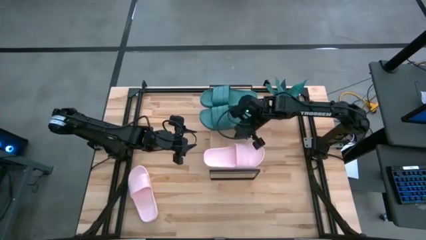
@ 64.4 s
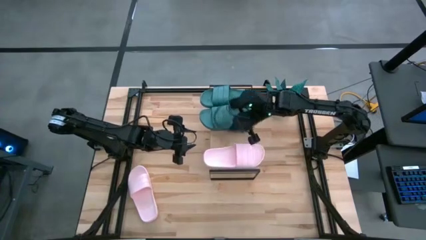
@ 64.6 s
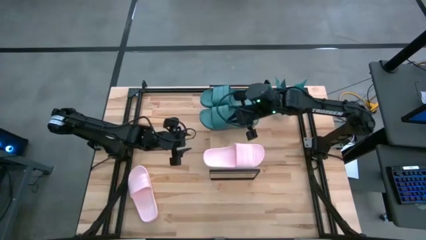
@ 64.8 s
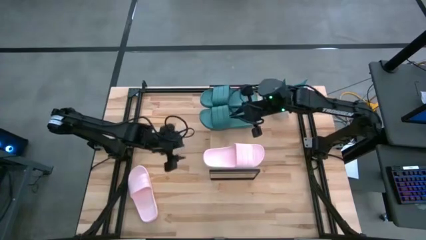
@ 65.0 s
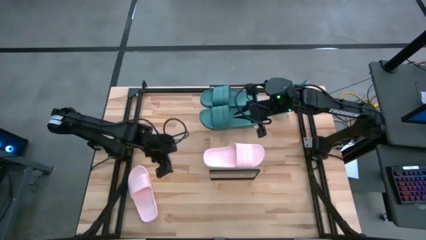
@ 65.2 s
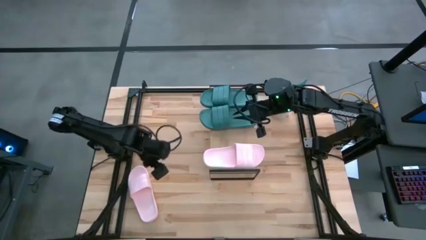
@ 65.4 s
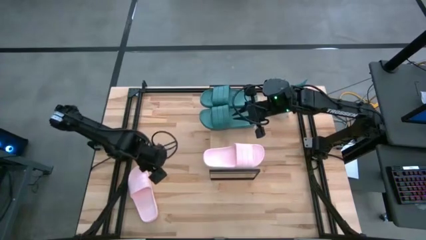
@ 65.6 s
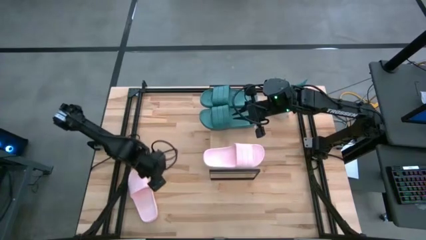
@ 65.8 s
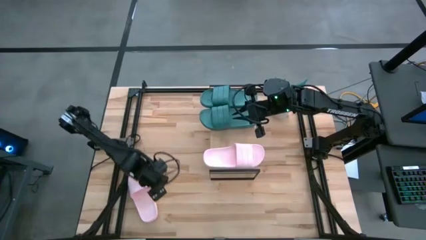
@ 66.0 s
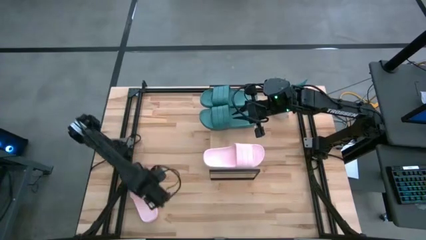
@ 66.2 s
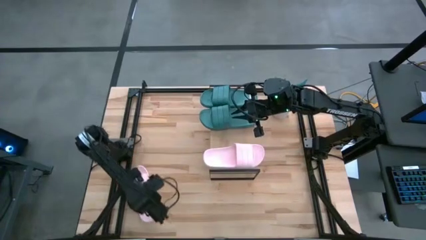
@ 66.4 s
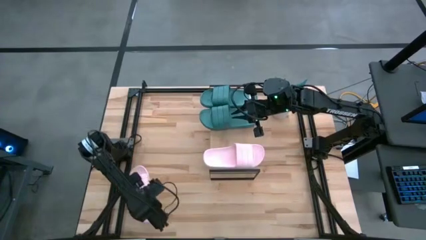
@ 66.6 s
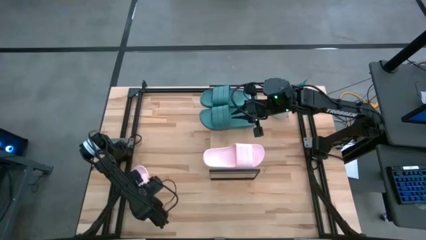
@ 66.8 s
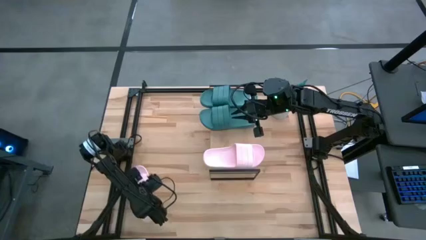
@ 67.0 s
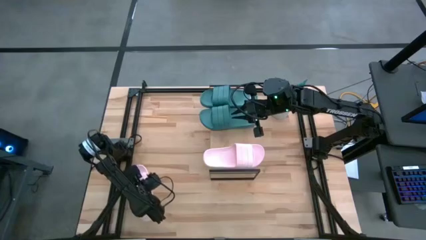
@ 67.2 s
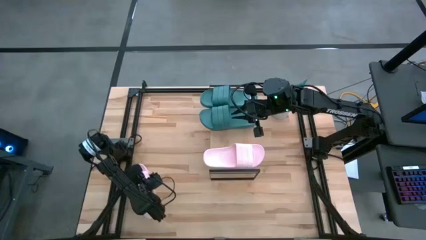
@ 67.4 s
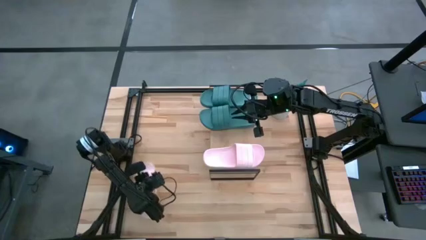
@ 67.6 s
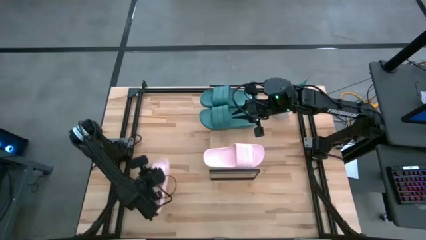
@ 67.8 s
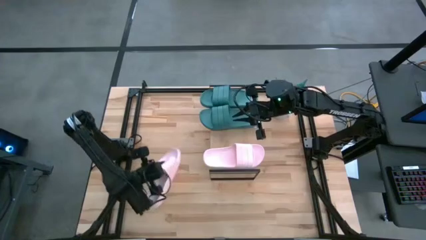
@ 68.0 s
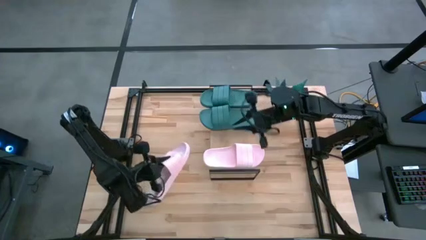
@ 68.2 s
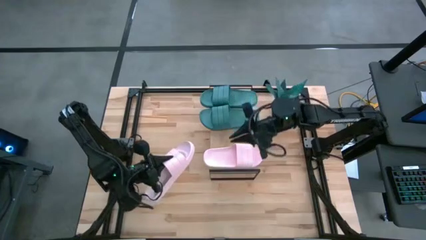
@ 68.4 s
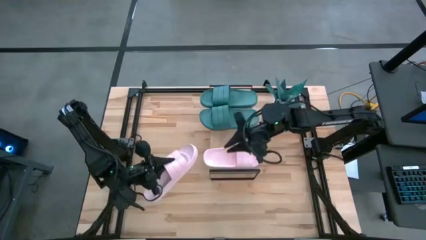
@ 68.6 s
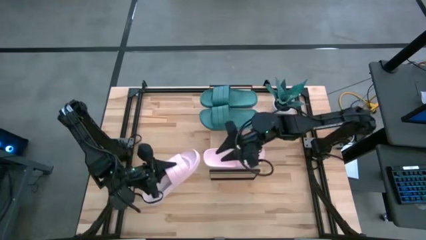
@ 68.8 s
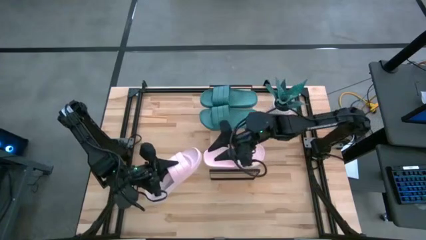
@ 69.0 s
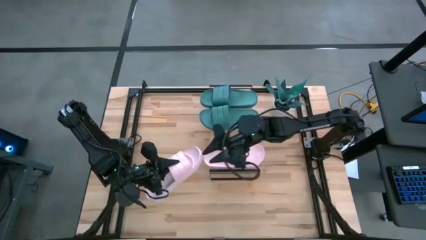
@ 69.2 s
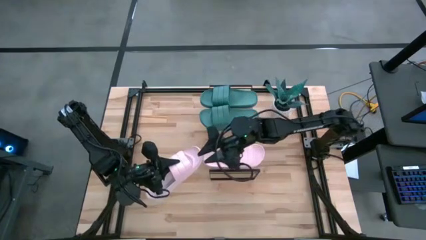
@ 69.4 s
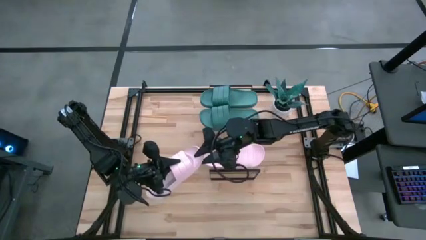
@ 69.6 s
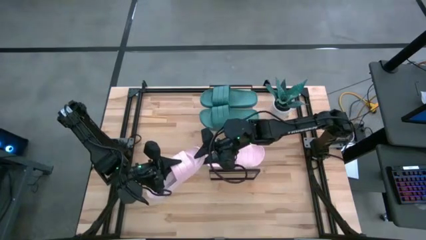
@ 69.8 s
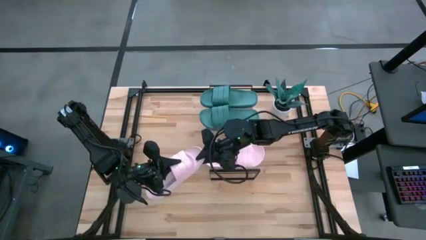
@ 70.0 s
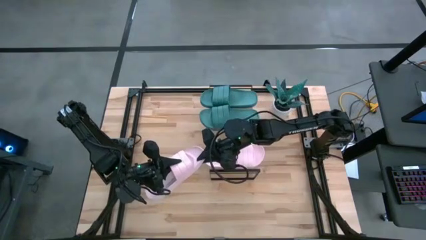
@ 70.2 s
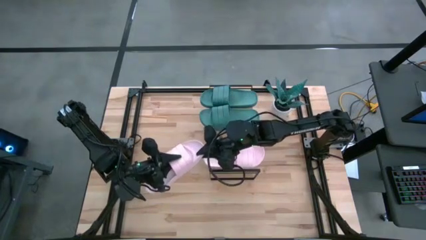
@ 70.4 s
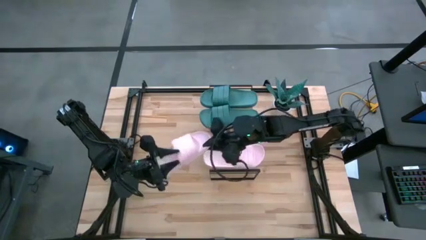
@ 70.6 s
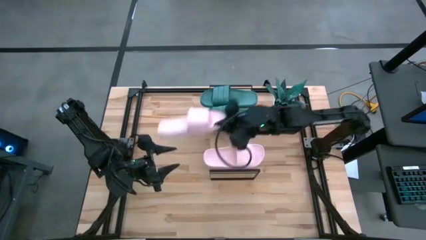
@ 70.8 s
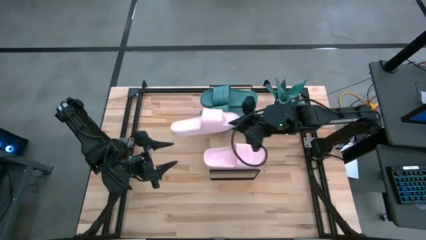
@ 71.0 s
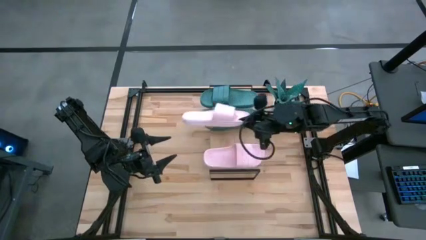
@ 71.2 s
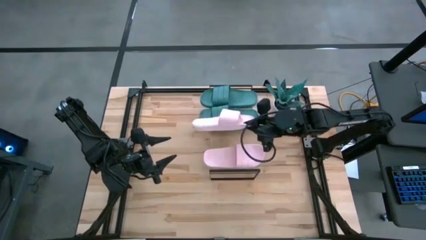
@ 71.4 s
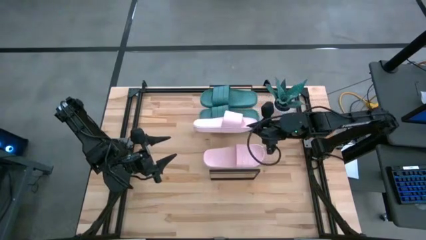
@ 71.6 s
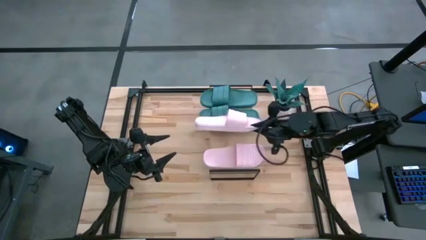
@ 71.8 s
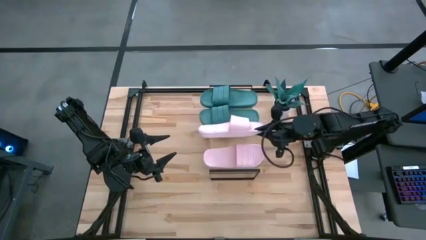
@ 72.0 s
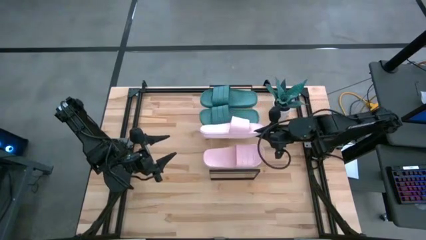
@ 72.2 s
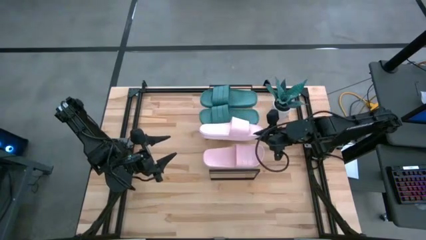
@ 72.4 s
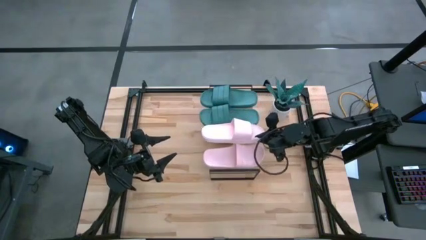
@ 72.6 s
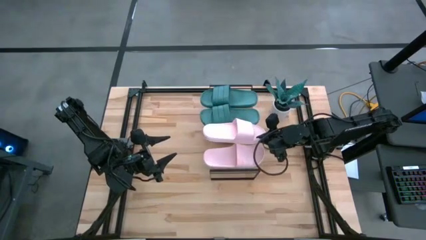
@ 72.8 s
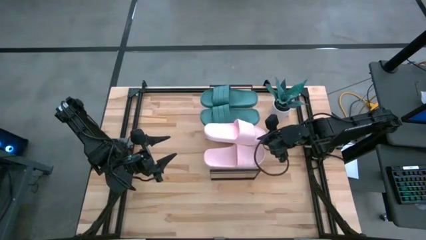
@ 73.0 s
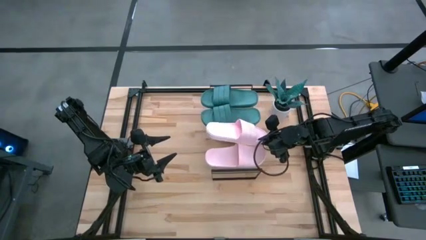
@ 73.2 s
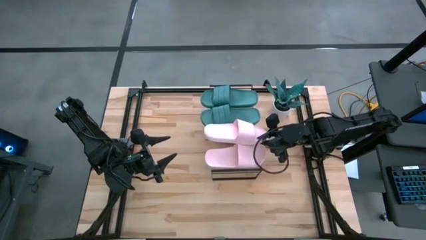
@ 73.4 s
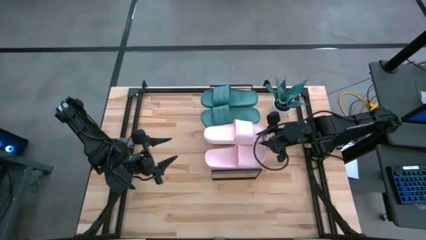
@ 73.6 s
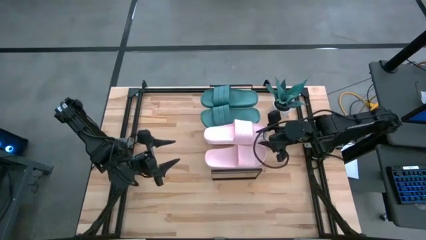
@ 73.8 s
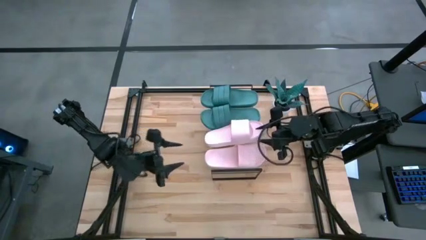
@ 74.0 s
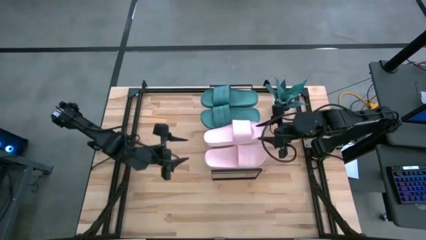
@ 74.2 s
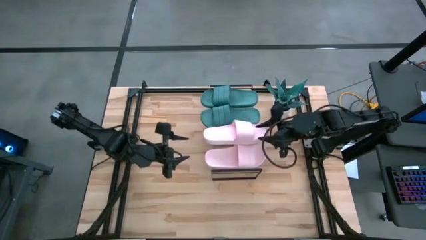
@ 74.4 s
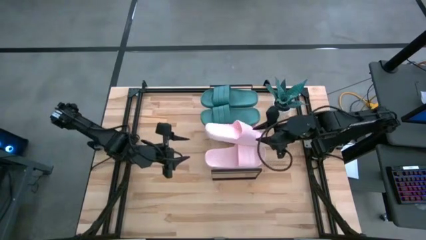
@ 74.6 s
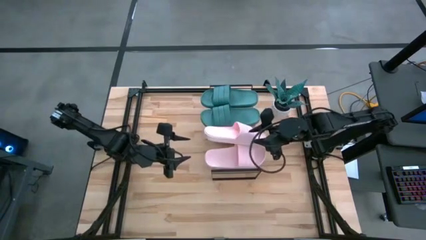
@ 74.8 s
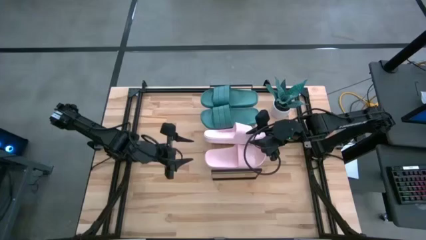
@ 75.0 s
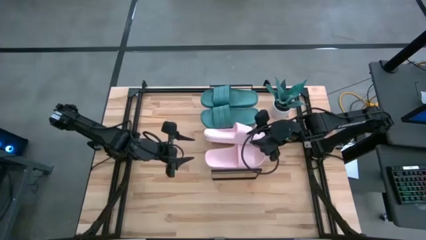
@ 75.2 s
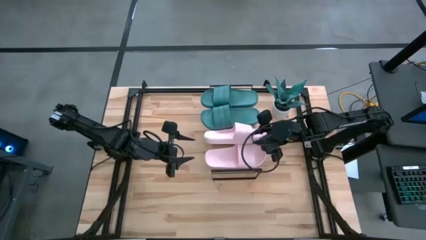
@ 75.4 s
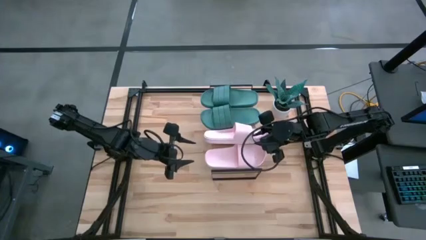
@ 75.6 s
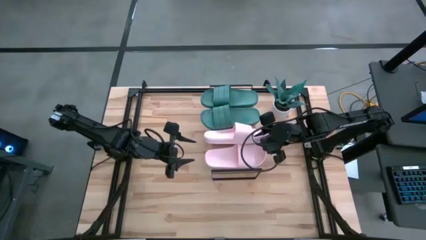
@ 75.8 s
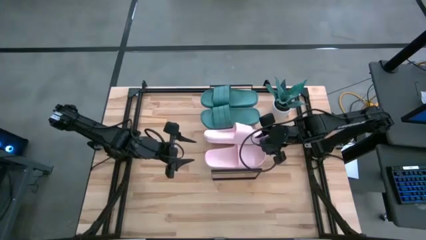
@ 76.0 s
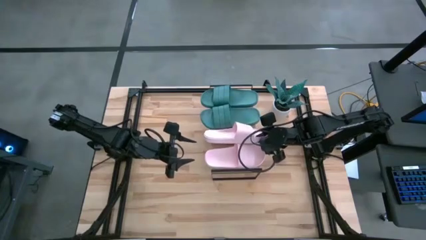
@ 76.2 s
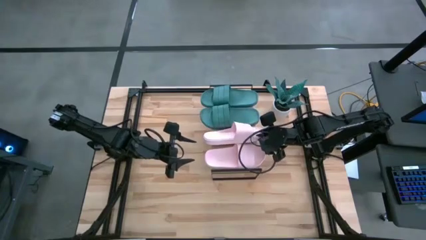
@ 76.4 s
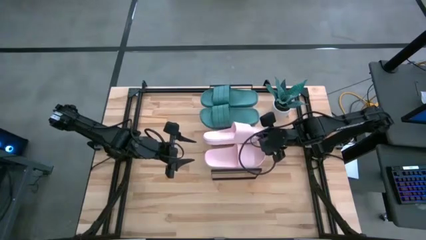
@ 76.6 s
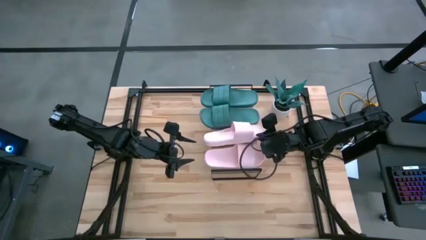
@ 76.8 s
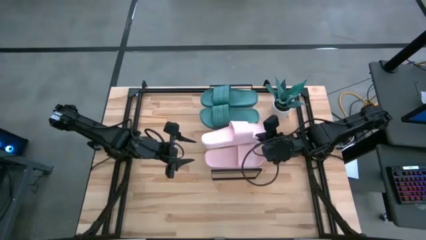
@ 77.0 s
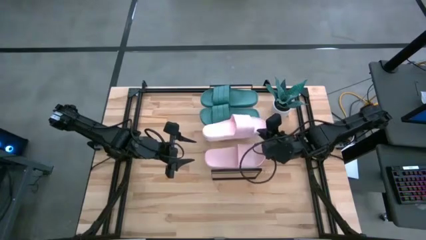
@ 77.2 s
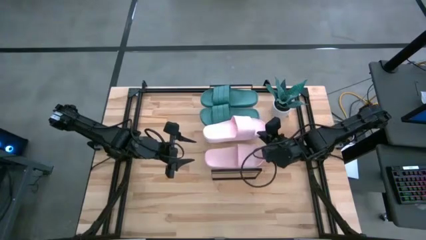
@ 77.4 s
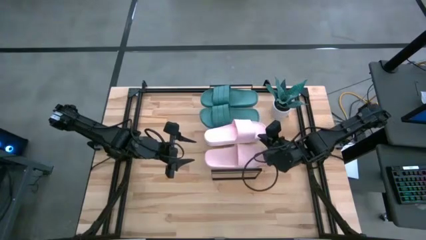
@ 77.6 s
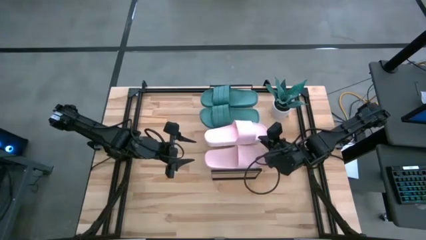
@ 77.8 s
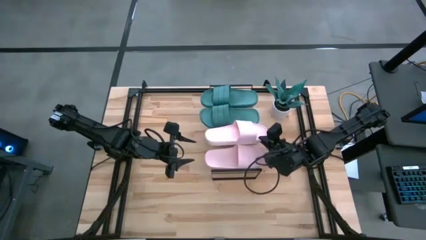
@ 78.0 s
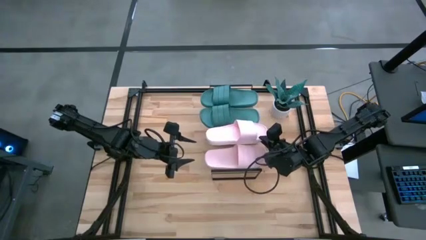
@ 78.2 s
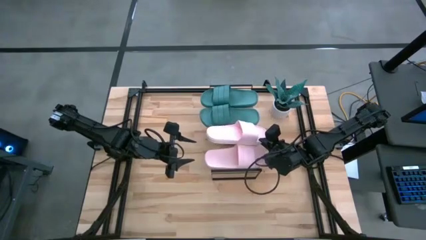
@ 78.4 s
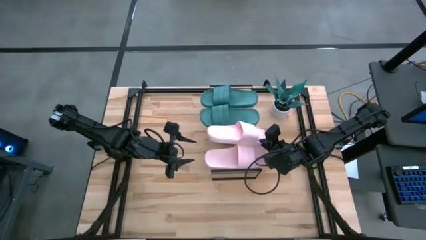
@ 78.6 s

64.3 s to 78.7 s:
Task: Pick and place slides into the shelf
Put the left pink slipper on the shelf

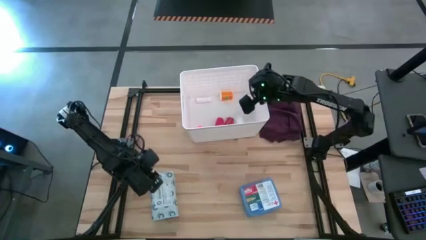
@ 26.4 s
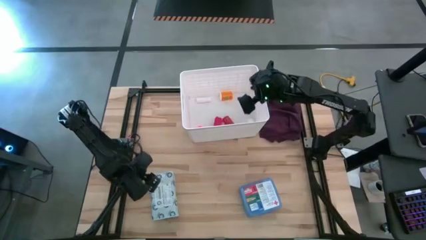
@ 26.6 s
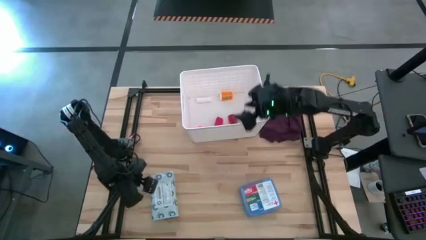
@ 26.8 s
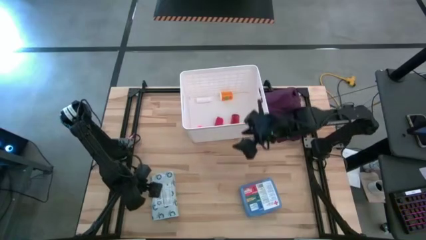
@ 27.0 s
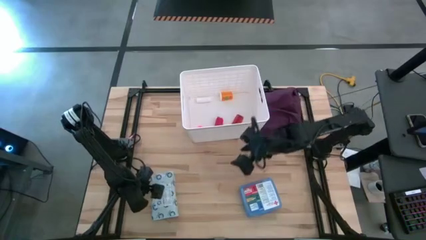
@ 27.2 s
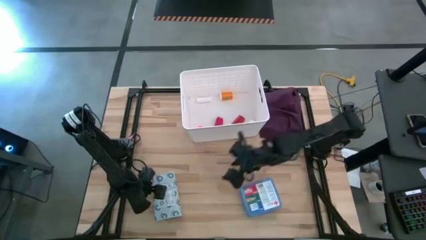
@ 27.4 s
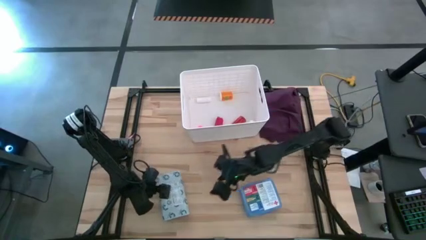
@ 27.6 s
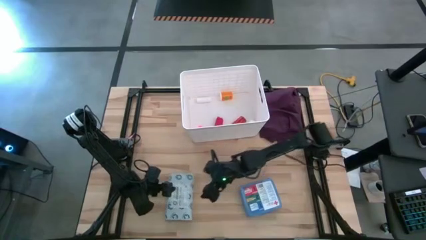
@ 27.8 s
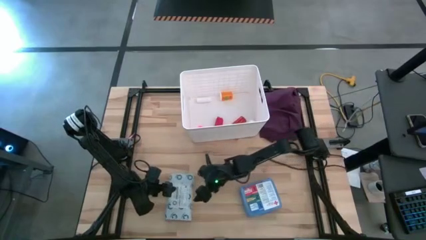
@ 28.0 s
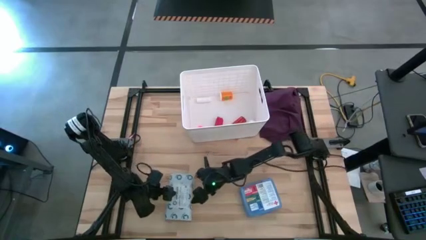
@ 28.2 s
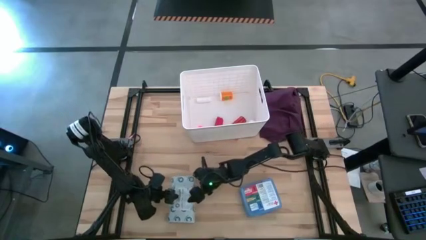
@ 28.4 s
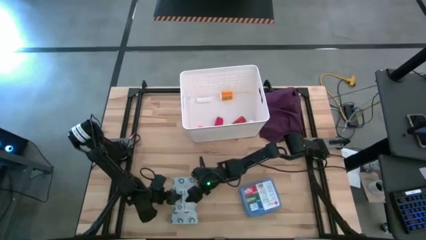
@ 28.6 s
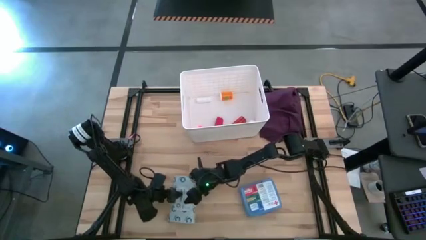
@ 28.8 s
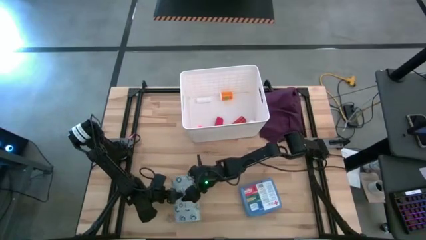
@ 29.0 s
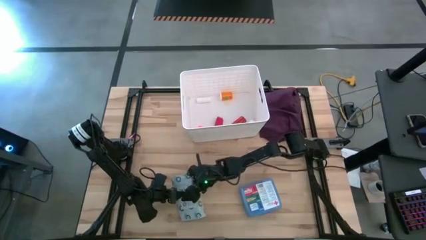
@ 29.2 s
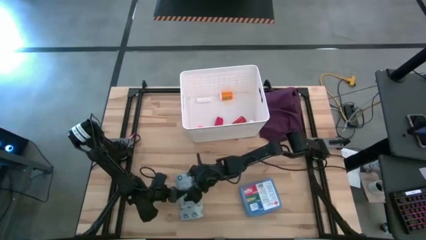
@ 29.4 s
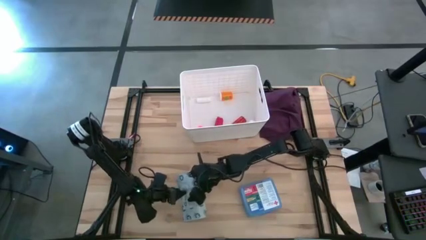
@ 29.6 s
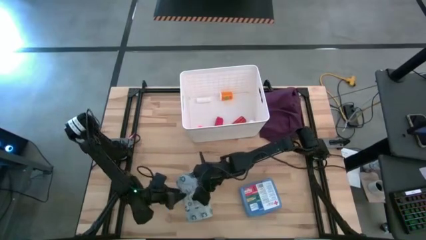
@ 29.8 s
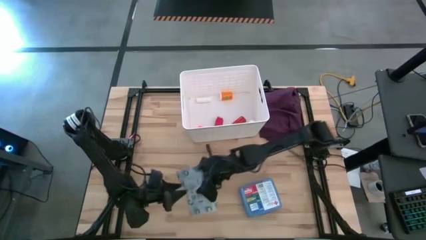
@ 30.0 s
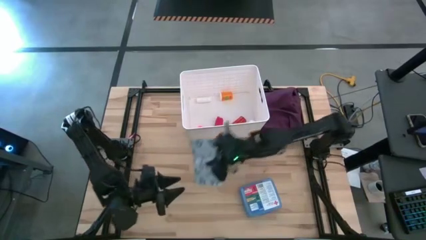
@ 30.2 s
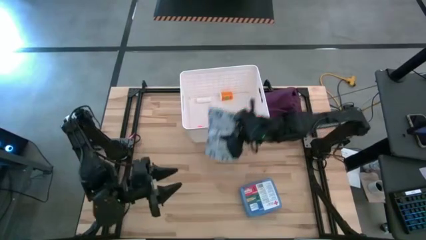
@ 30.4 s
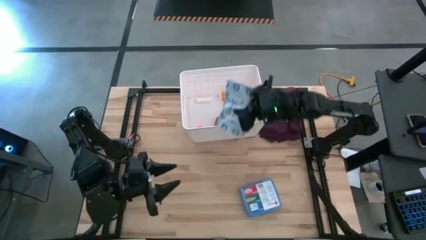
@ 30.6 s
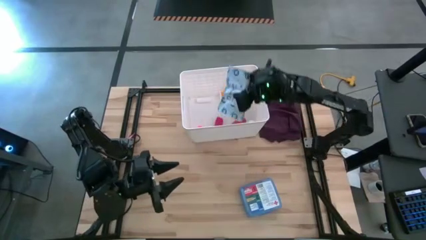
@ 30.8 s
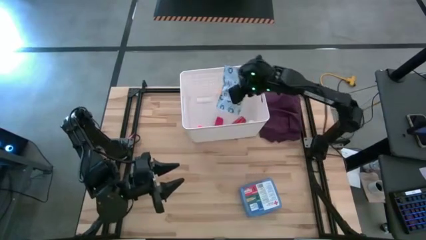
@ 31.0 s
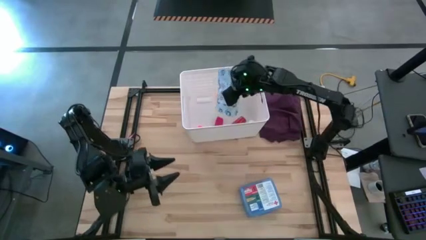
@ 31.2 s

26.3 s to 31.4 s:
Task: Pick & place medical supplies in basket/bin
Put the mailer bag into the white bin
